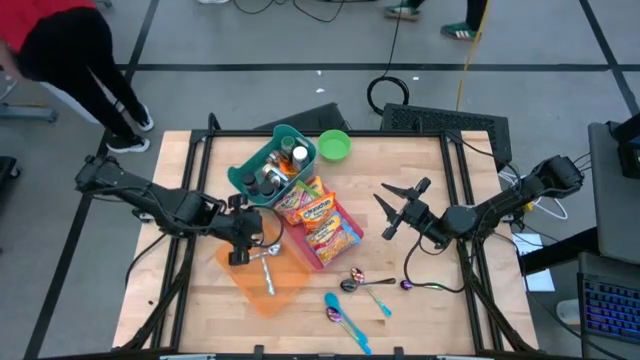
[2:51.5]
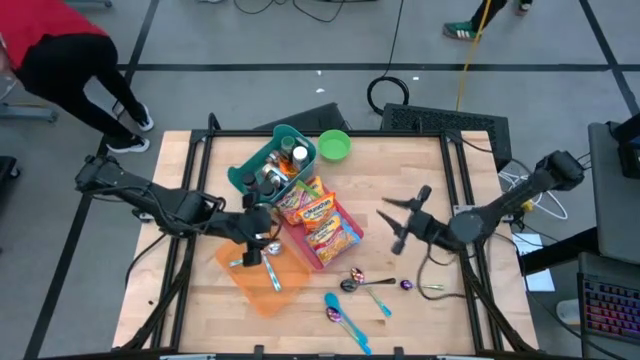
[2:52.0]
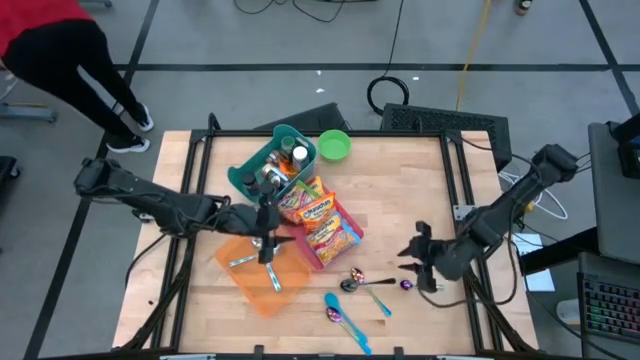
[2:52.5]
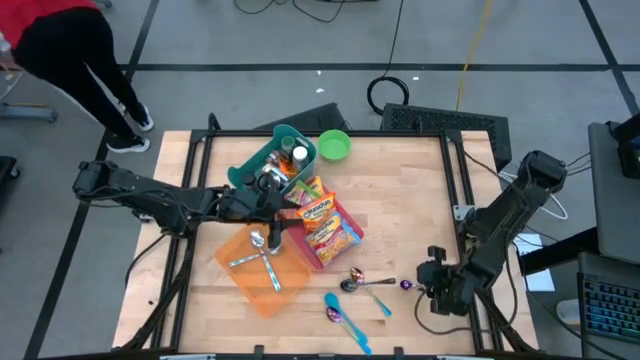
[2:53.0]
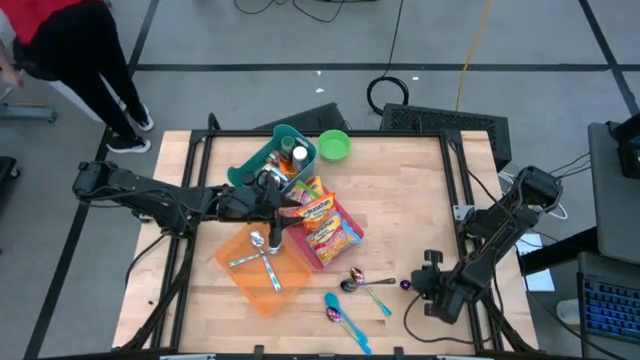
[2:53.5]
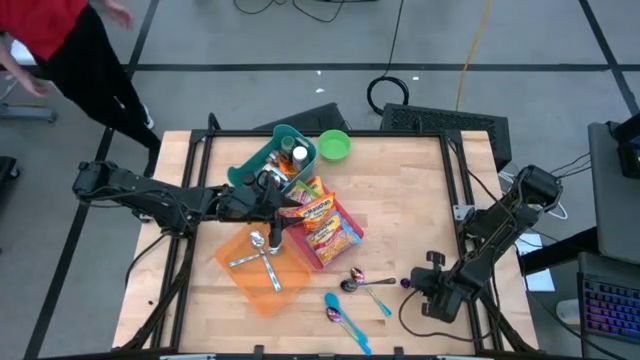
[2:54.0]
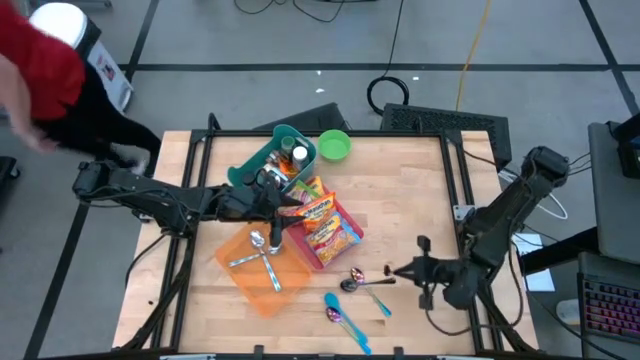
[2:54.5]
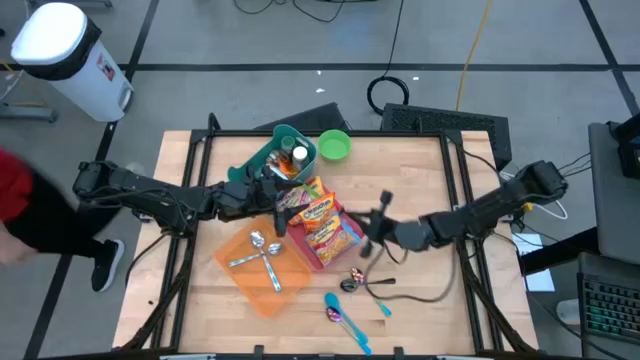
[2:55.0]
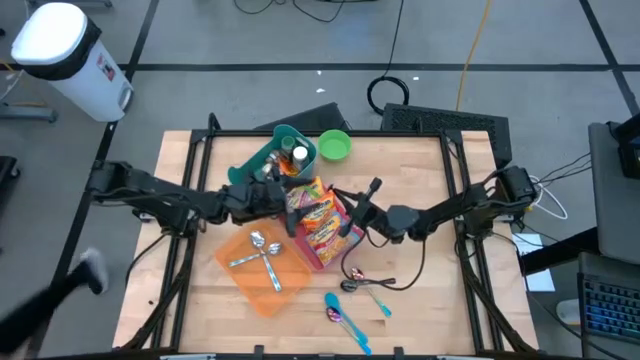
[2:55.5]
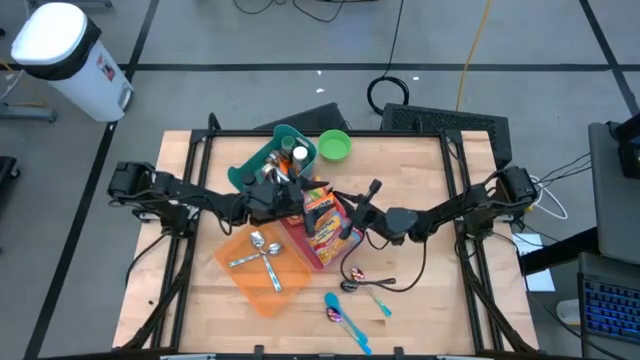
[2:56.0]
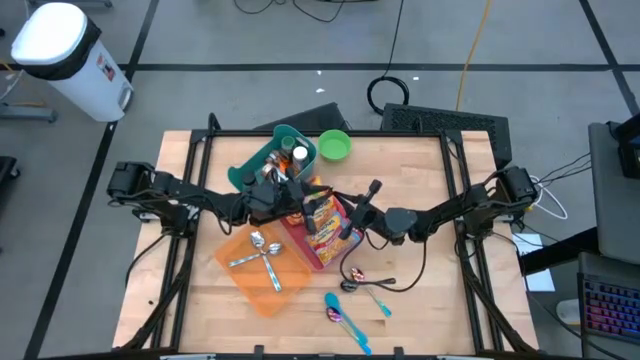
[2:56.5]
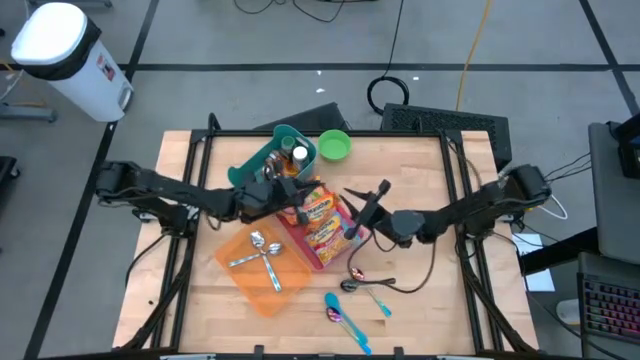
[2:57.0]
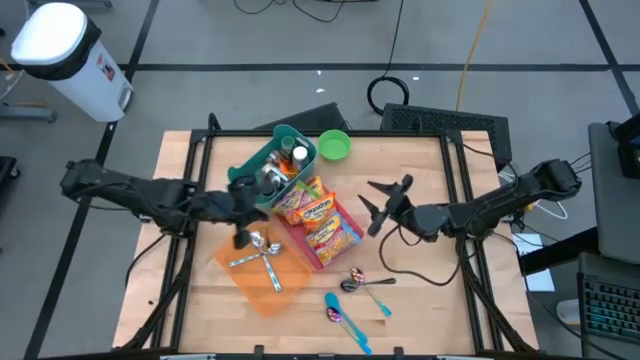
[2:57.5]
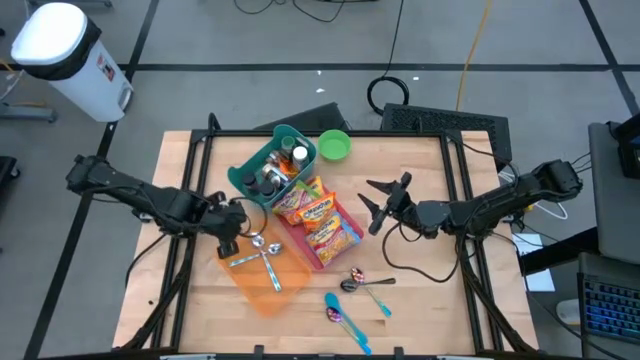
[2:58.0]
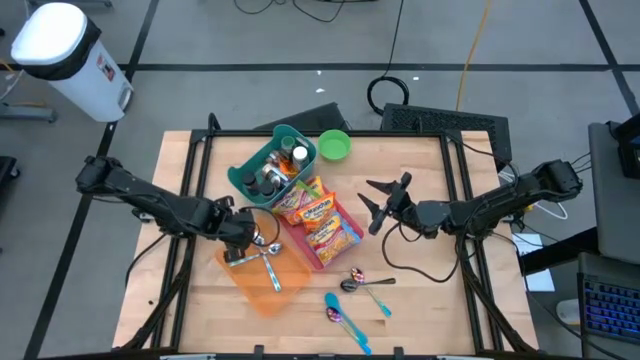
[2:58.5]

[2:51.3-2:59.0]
Task: Pick & Place Food Item
Put the top right blue green spoon into the orange bin

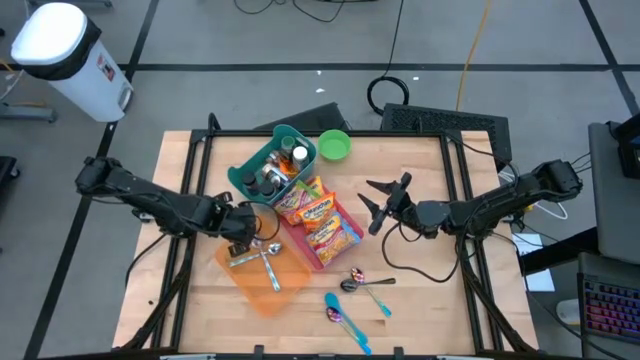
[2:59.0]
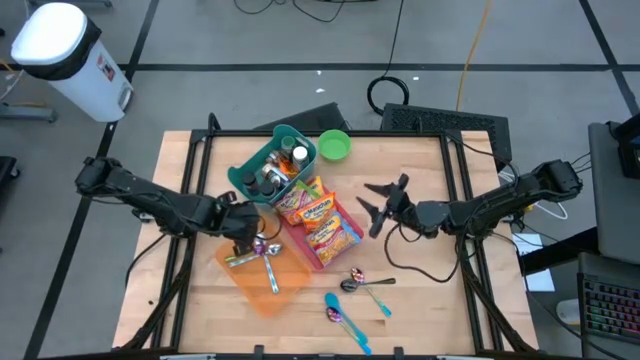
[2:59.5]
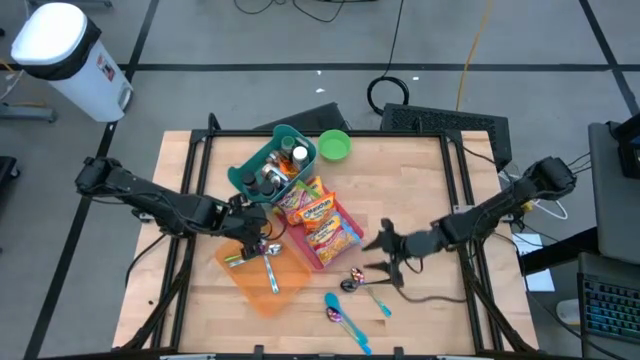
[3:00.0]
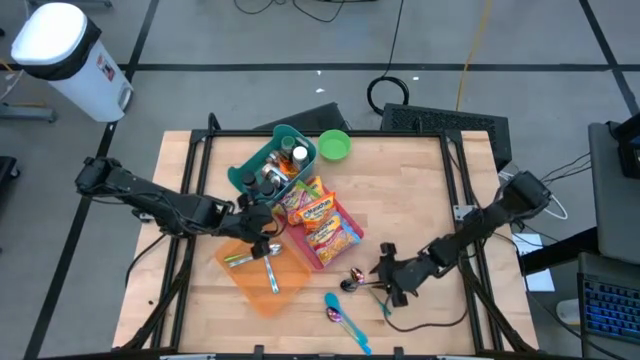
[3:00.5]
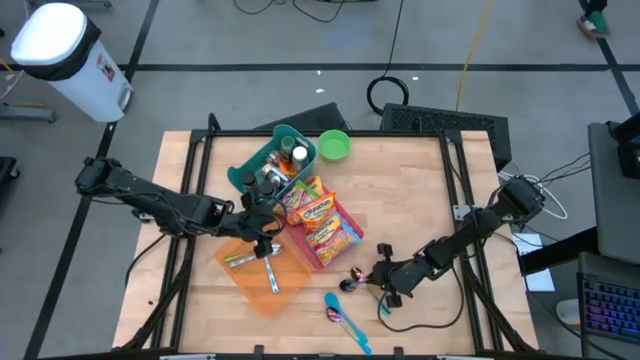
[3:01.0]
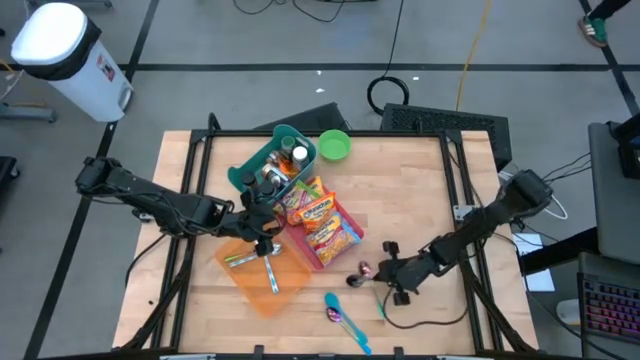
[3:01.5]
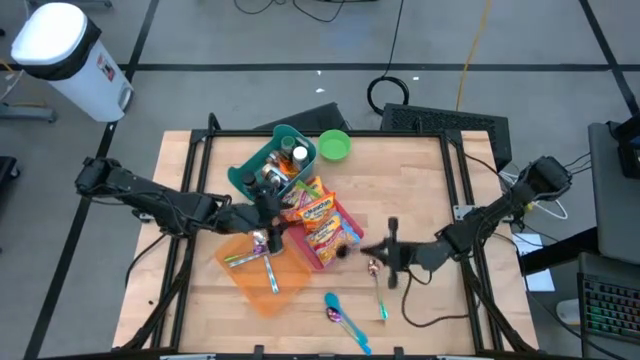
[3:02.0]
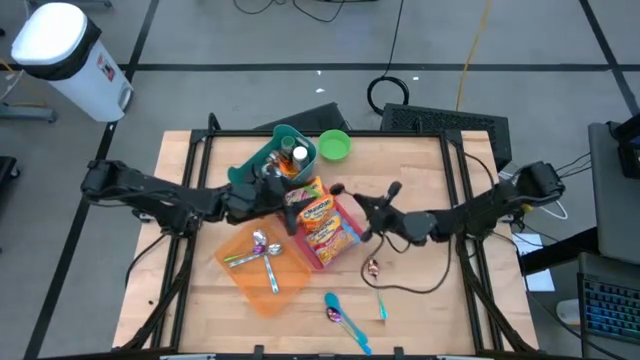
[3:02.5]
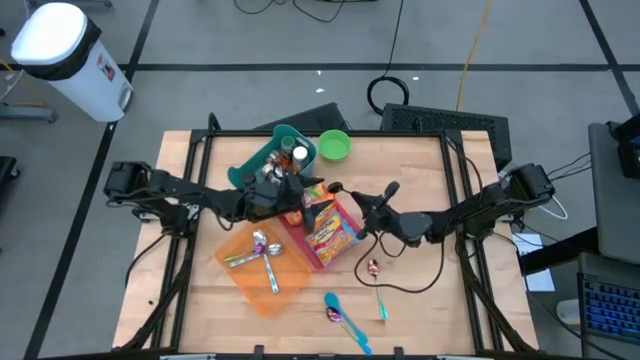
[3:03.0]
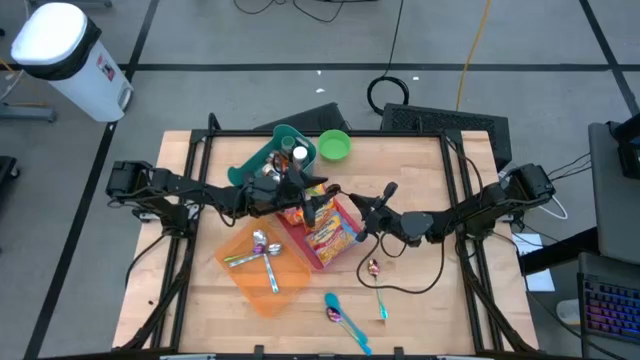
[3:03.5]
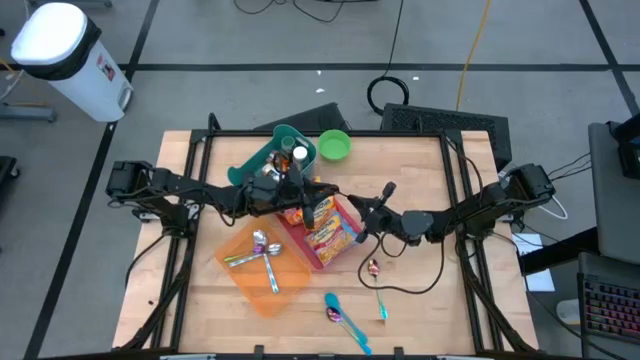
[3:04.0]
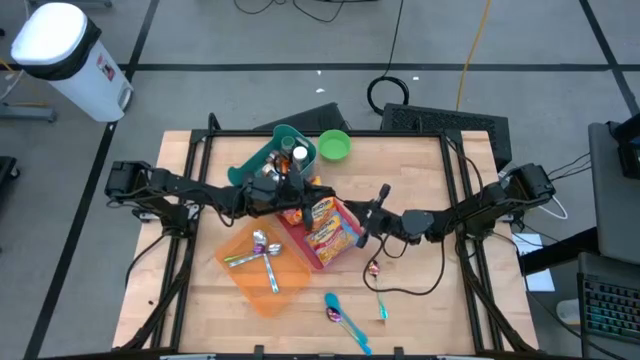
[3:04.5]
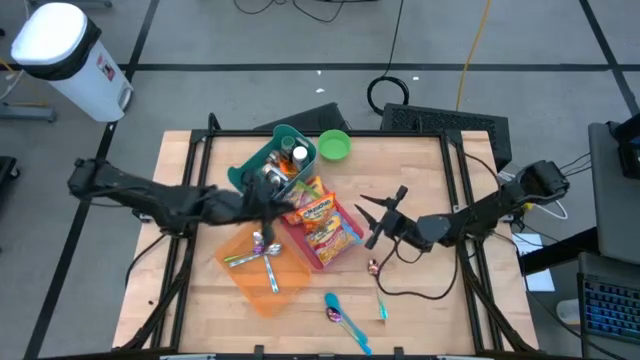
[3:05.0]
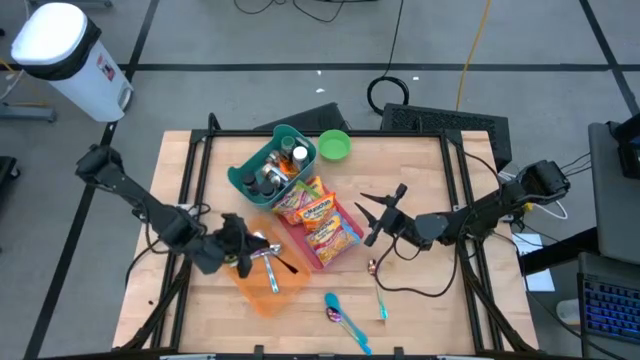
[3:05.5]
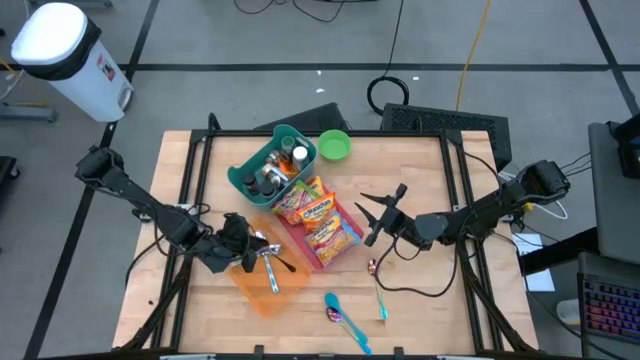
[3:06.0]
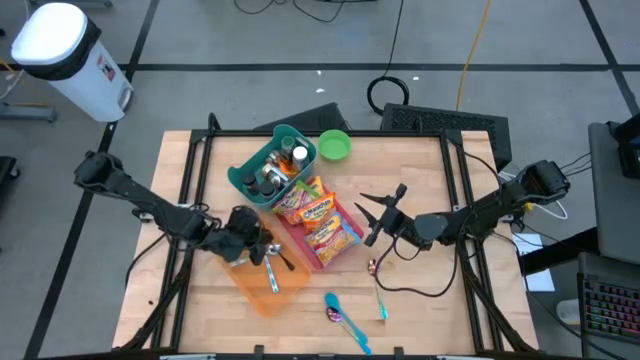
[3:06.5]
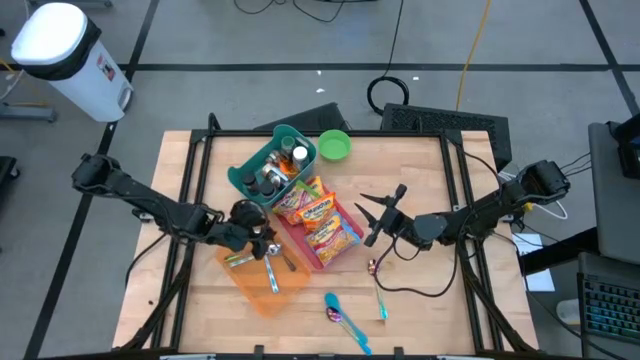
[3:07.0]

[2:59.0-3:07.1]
Put the black spoon into the orange bin

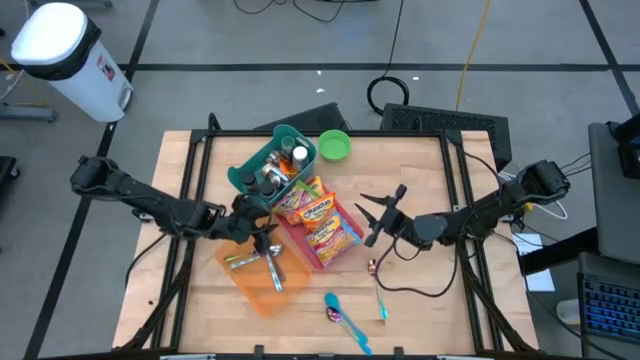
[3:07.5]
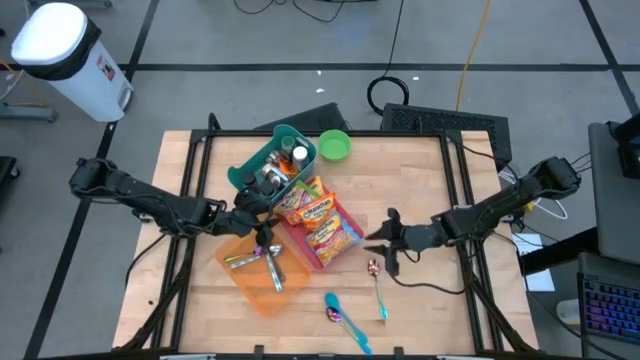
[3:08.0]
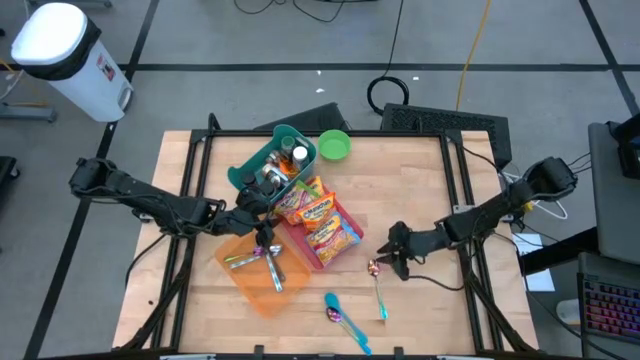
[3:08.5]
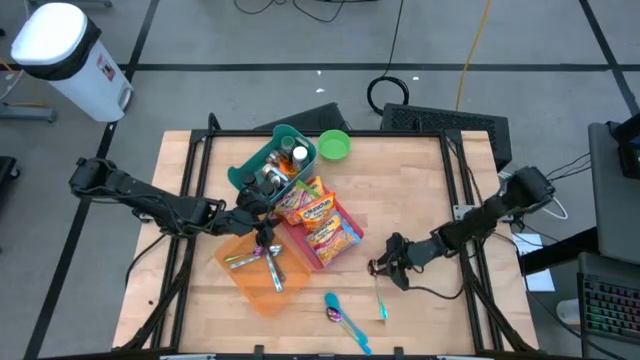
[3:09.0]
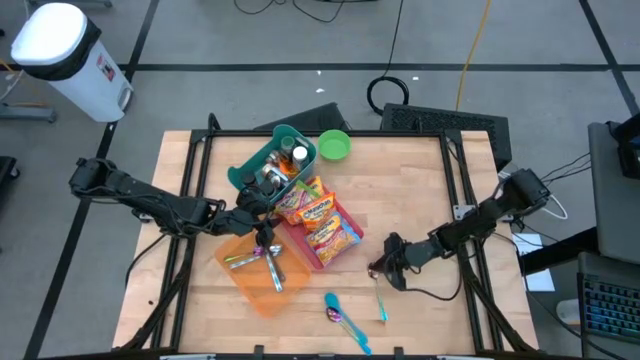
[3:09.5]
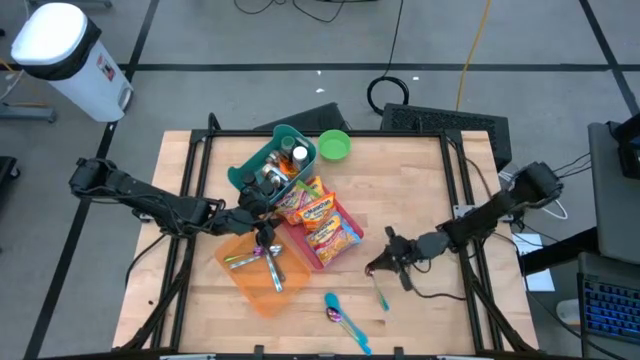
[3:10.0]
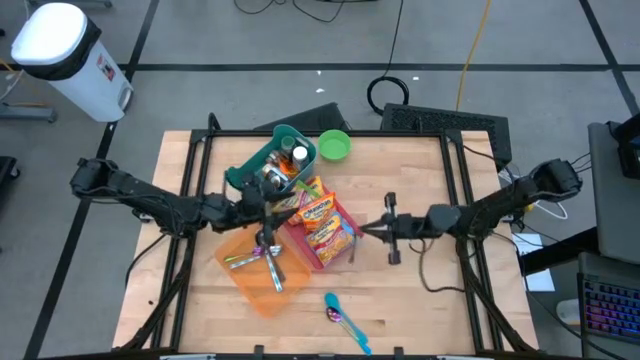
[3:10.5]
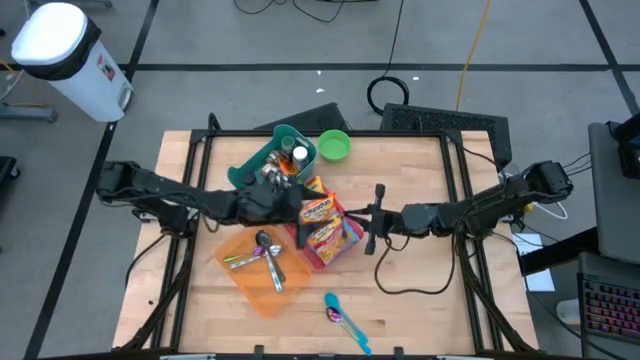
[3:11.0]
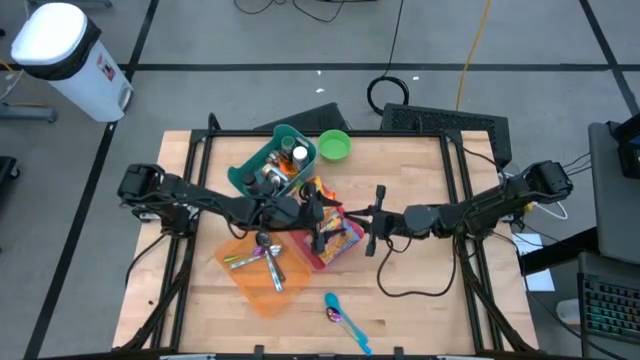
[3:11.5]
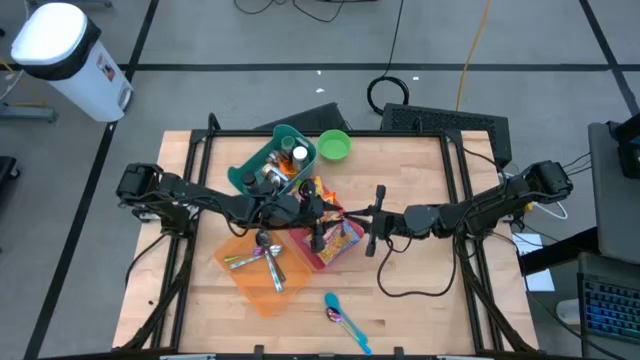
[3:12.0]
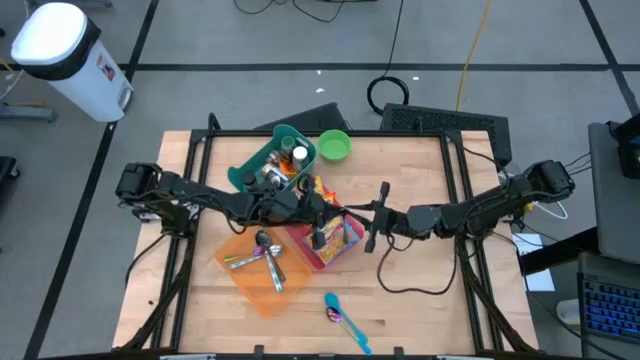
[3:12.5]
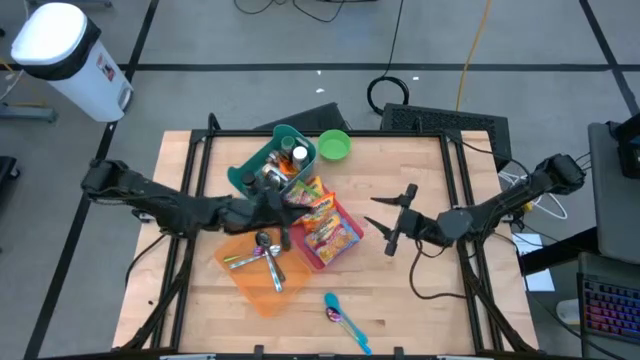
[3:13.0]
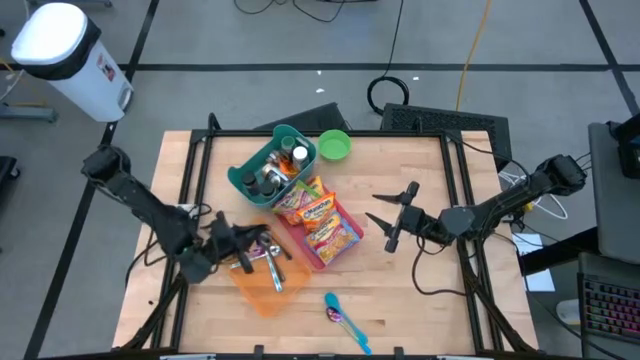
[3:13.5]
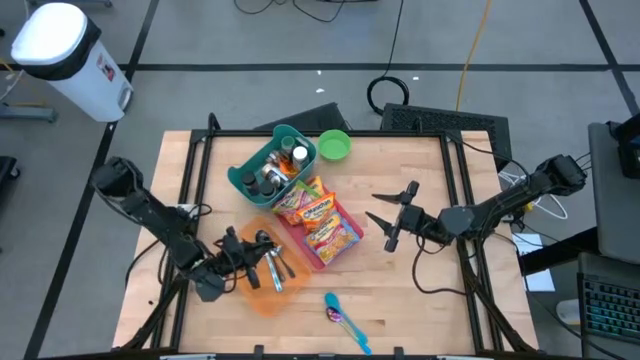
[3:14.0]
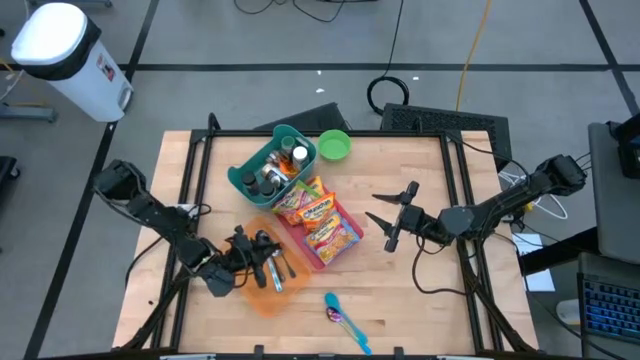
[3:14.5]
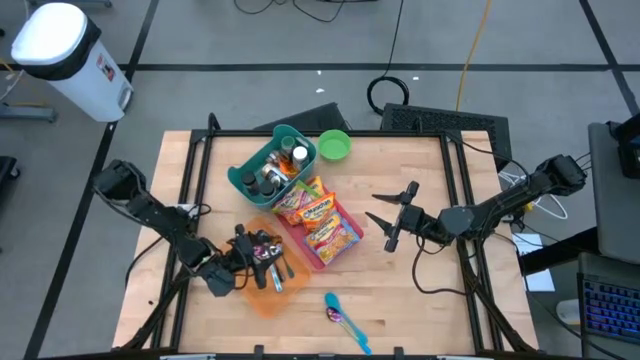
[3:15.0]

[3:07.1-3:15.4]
Put the right blue green spoon into the orange bin
